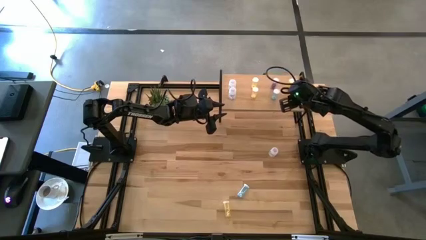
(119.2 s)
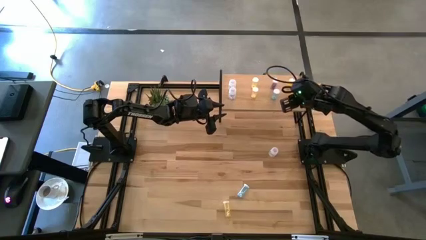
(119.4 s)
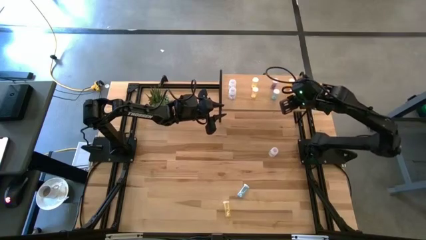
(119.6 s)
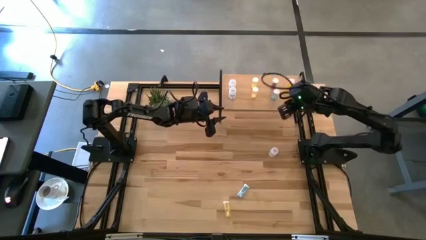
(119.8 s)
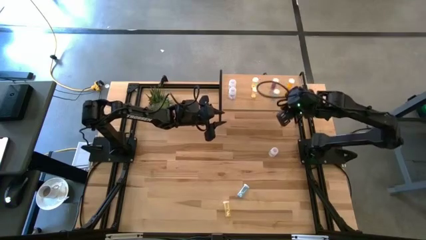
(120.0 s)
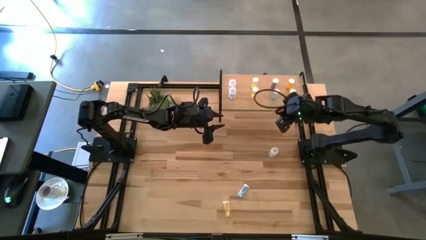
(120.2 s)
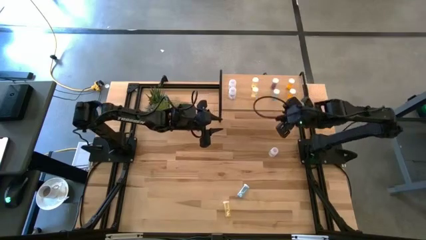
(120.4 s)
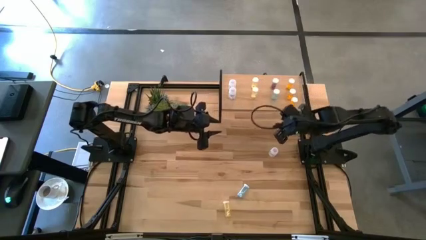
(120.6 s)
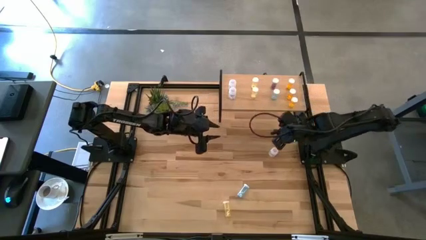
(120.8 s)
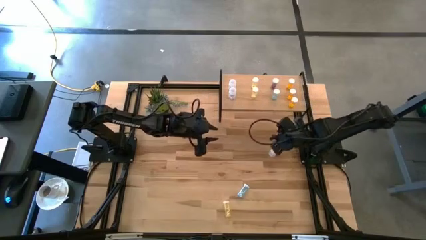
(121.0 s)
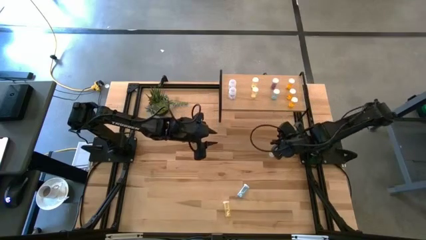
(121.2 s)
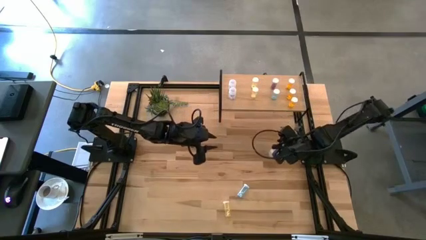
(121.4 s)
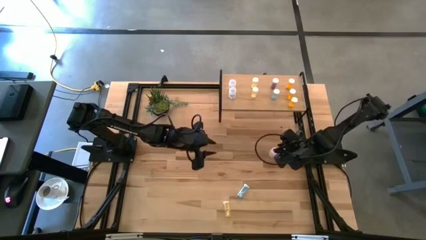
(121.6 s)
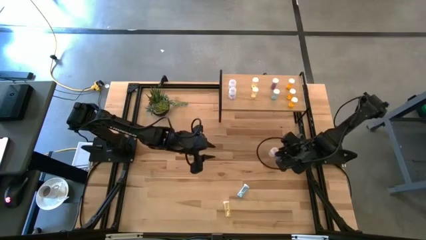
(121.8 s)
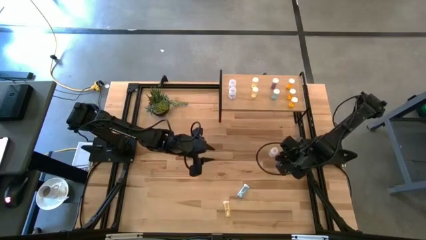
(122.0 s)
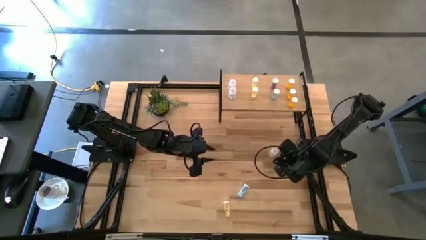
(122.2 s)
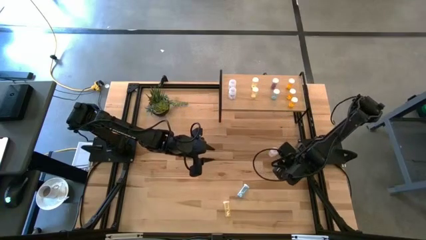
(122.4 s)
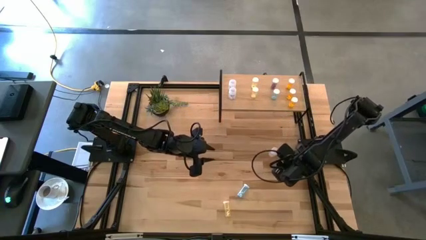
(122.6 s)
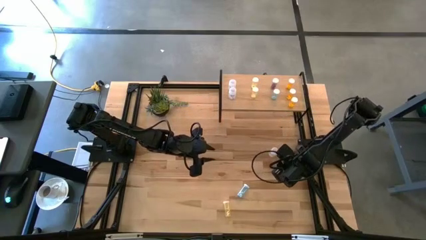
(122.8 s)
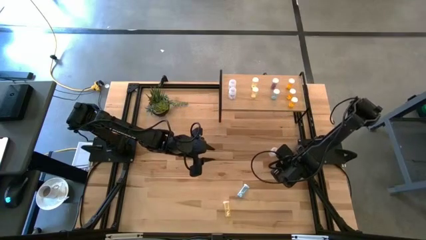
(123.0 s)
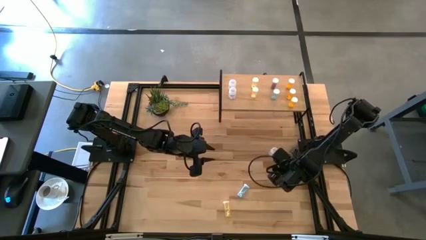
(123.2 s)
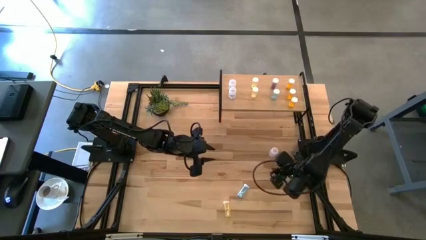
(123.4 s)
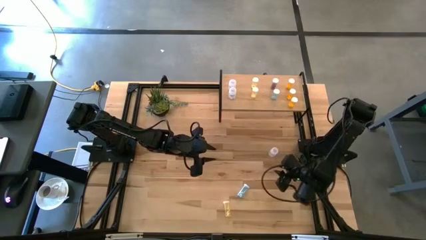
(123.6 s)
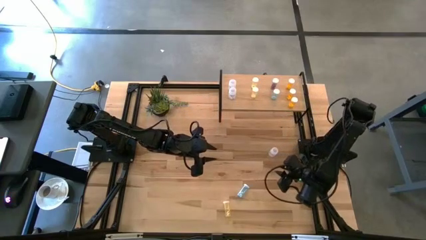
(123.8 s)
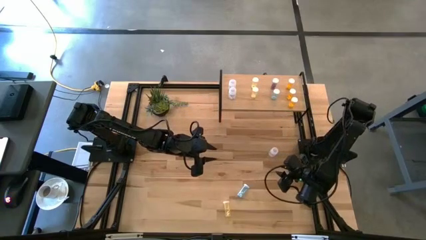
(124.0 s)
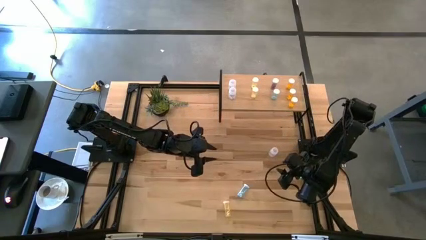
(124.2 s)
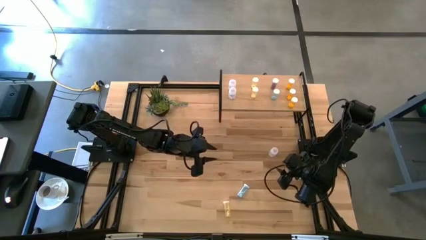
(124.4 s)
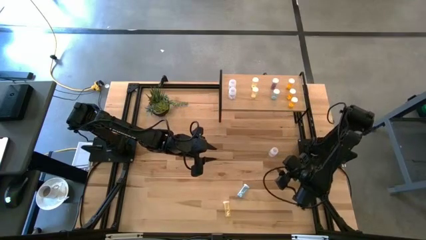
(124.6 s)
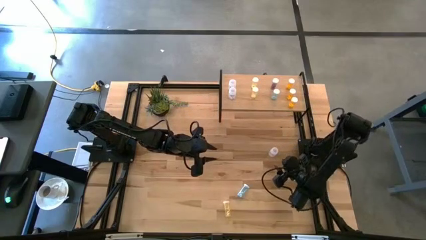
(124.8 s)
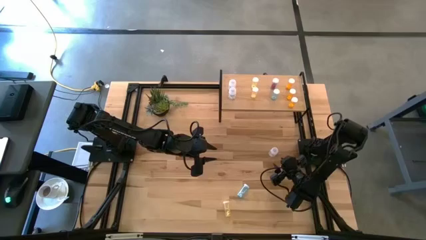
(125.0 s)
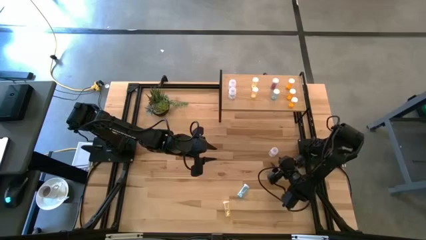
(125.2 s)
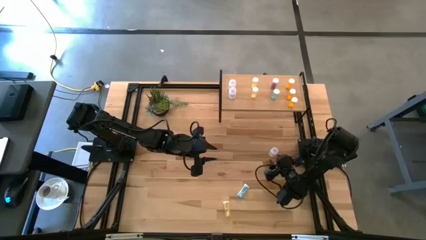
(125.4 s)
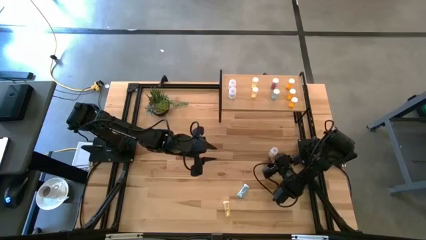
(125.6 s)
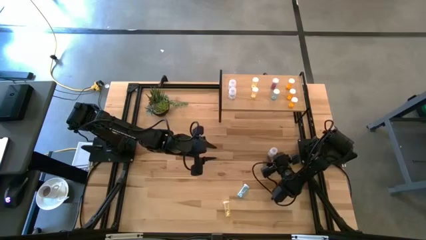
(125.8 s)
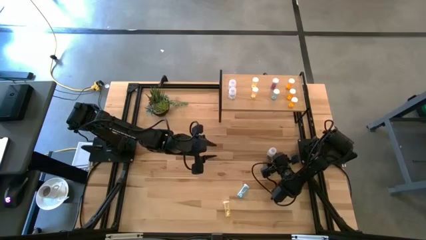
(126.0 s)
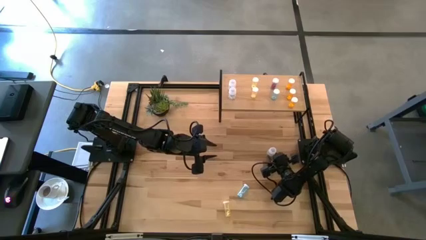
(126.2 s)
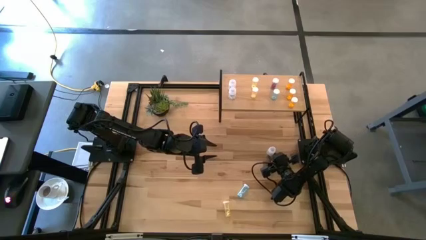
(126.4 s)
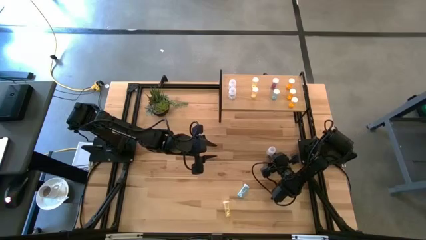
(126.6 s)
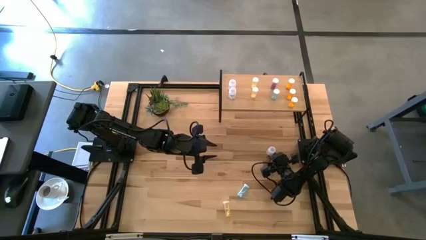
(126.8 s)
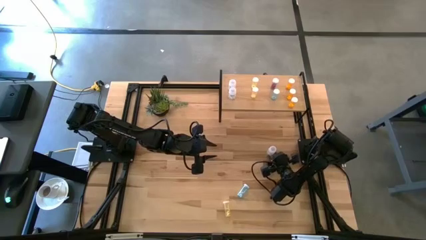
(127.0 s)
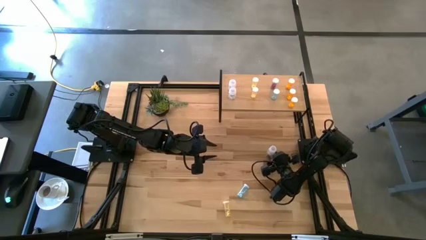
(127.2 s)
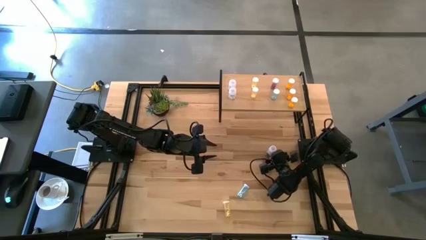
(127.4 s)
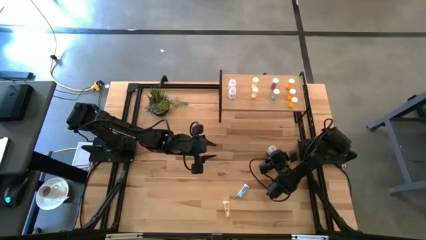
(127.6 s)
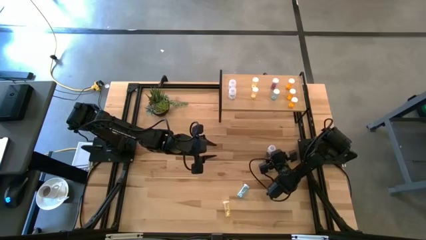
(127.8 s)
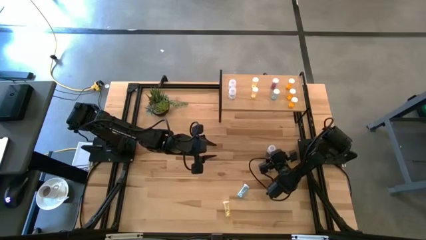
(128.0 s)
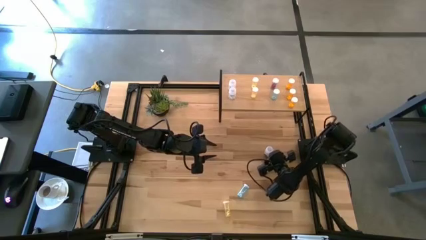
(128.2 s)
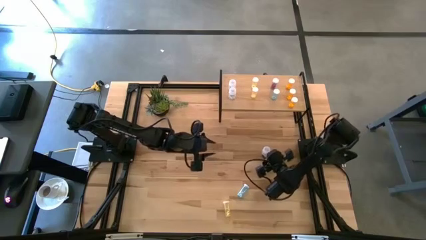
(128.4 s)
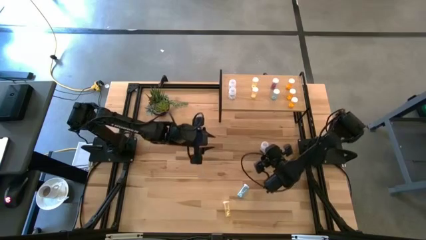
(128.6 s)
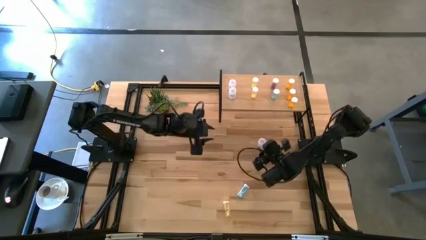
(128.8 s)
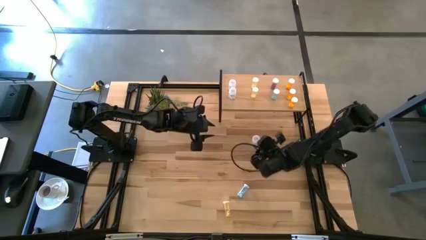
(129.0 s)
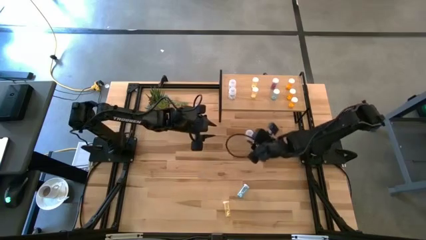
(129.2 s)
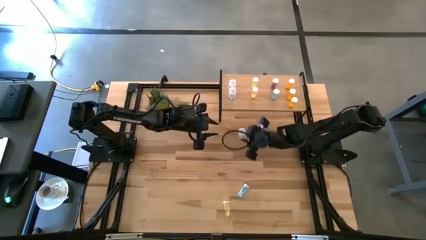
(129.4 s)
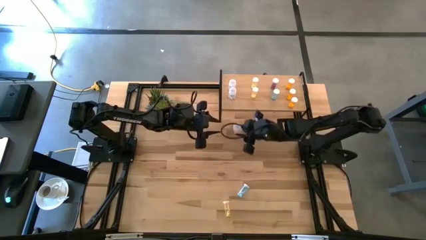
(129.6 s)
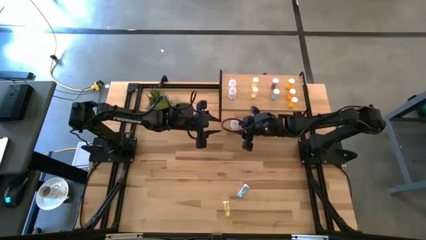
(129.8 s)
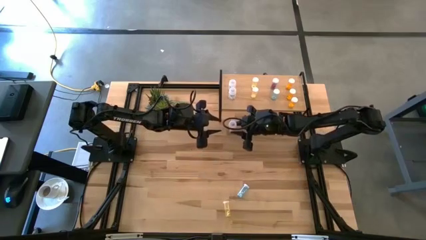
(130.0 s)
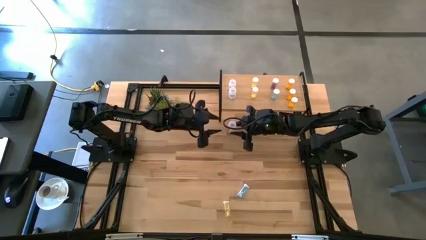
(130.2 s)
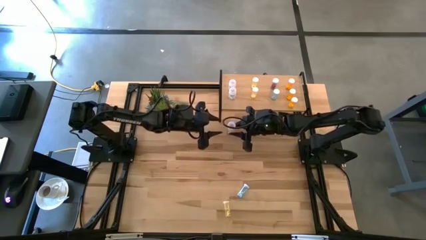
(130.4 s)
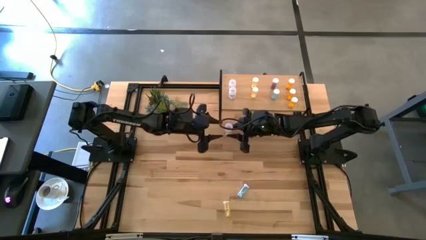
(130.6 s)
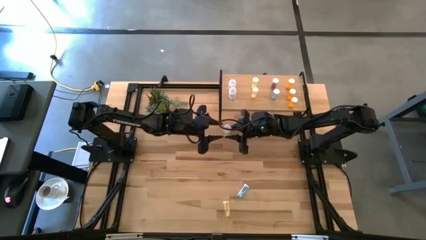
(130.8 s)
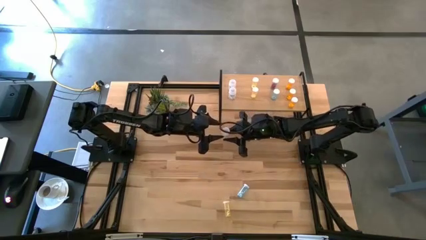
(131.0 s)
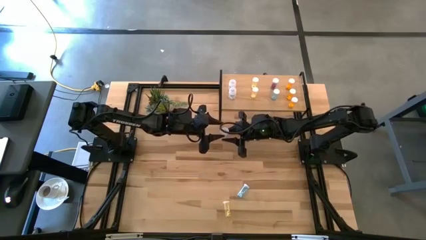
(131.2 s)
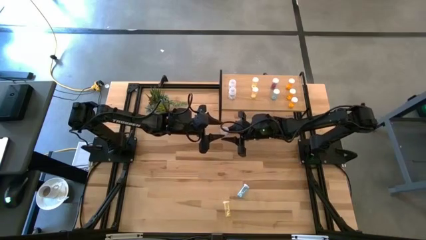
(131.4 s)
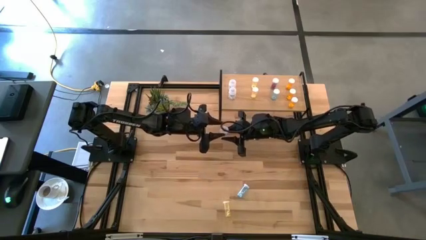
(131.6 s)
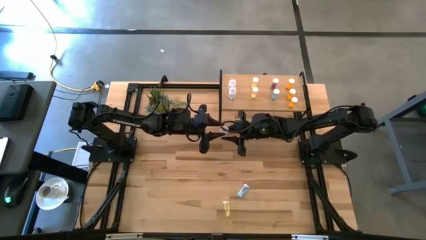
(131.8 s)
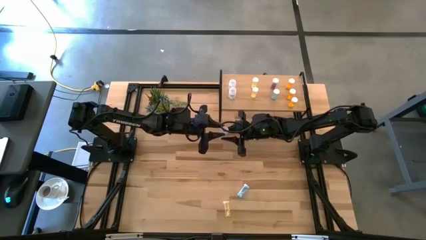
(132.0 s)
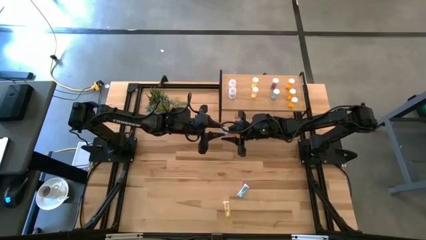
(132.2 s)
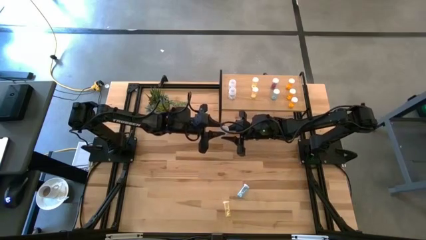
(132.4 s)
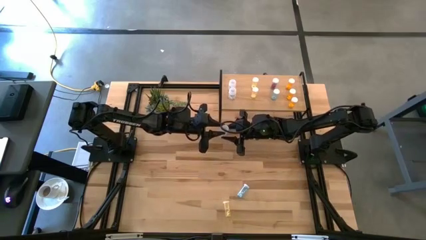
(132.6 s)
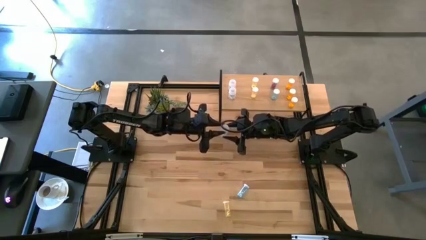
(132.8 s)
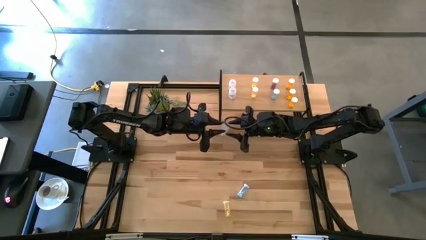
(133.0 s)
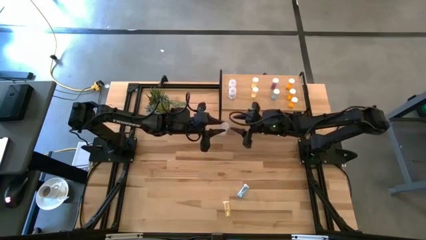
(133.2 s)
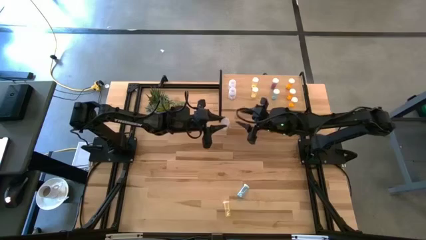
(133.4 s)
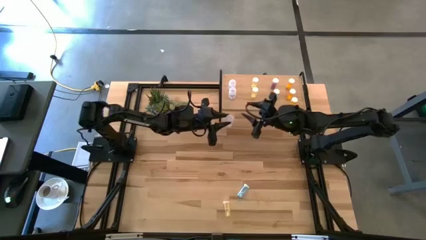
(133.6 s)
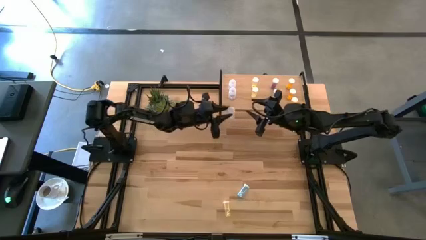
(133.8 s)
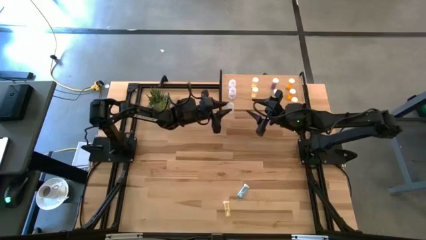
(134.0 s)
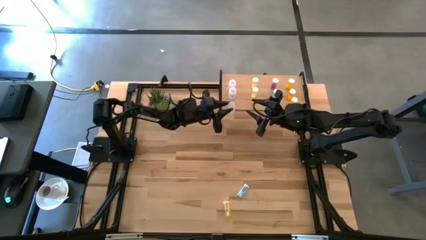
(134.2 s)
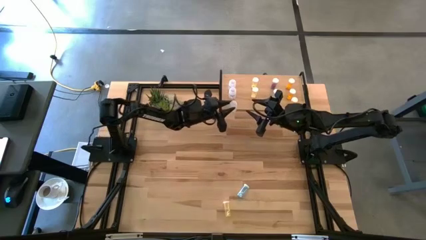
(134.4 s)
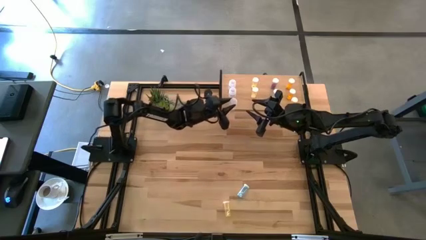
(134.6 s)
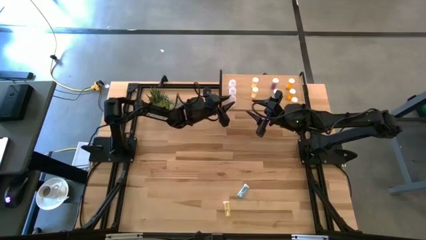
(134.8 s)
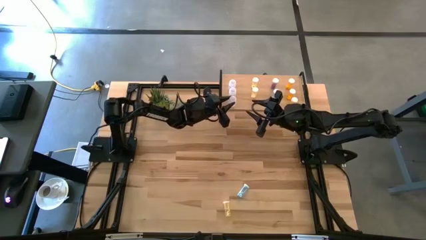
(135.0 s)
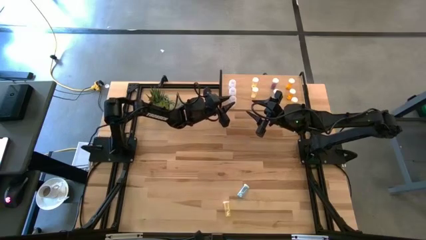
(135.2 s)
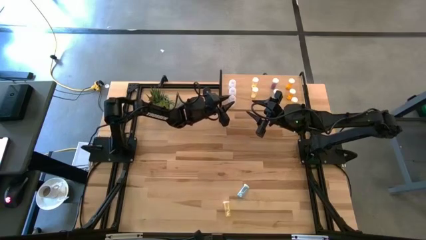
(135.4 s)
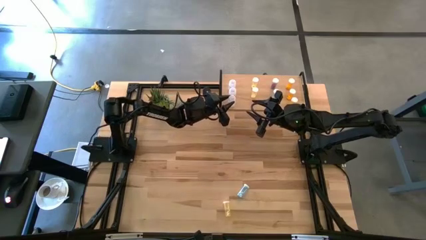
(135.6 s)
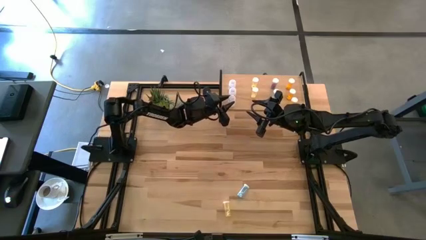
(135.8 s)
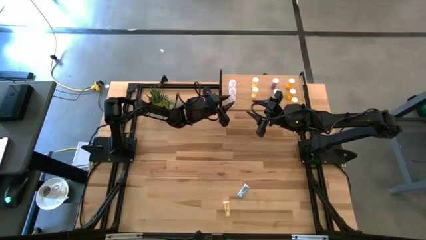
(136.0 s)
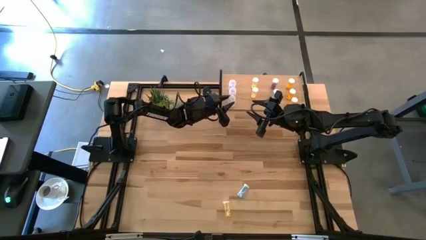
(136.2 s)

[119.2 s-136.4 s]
Task: Pick and place medicine bottles onto shelf by color
Put the transparent pill bottle aligned with the other transparent pill bottles on the shelf
